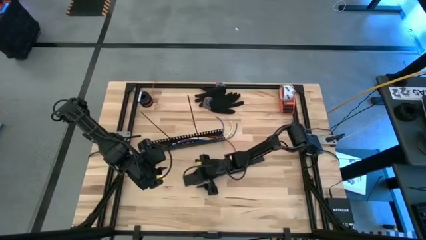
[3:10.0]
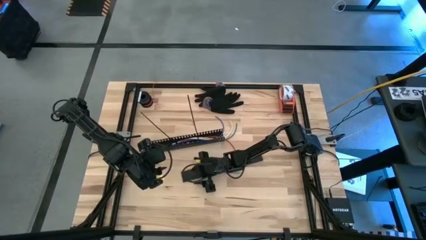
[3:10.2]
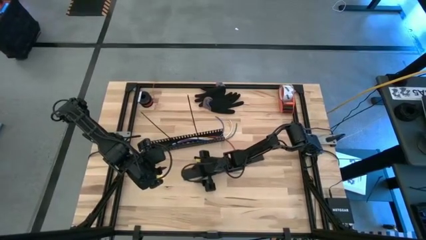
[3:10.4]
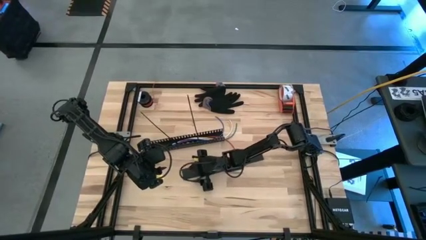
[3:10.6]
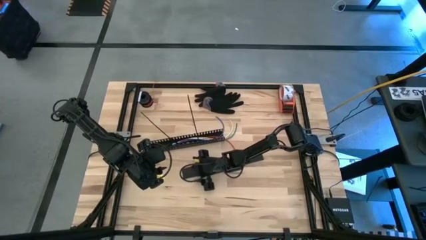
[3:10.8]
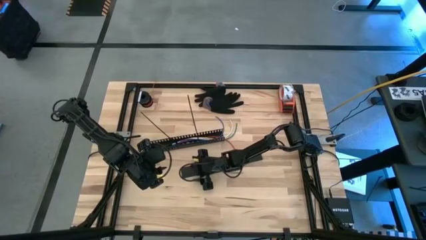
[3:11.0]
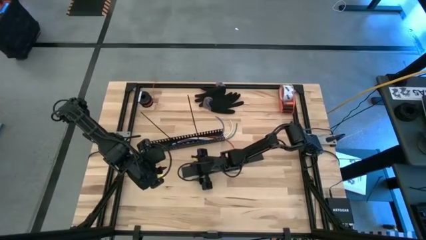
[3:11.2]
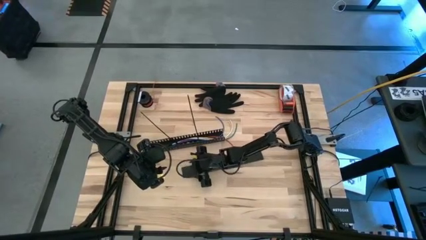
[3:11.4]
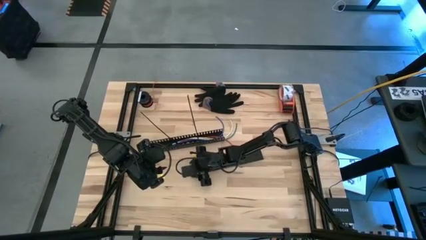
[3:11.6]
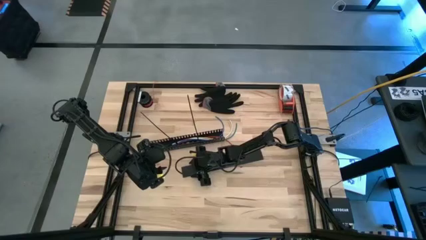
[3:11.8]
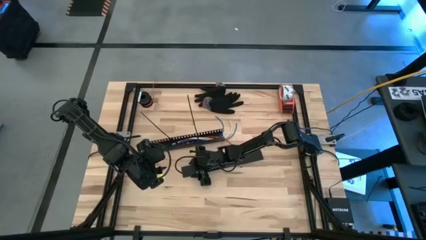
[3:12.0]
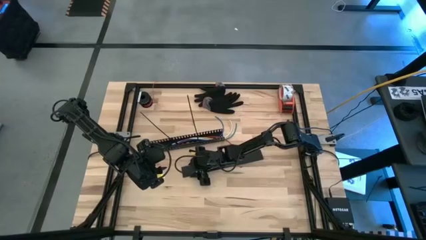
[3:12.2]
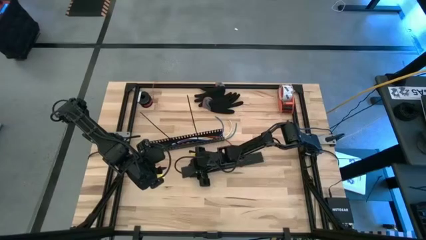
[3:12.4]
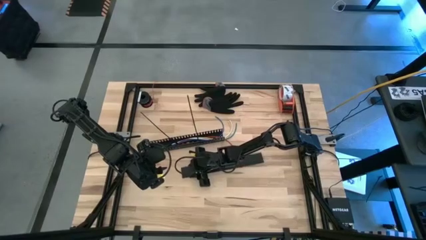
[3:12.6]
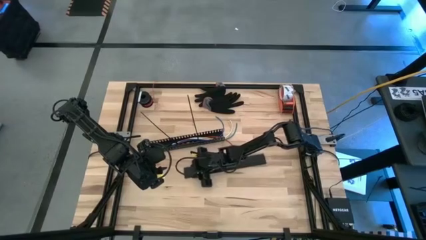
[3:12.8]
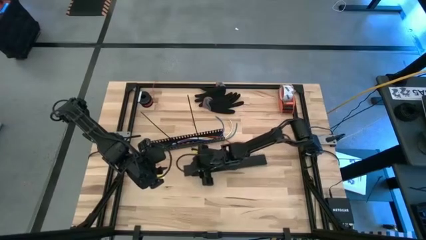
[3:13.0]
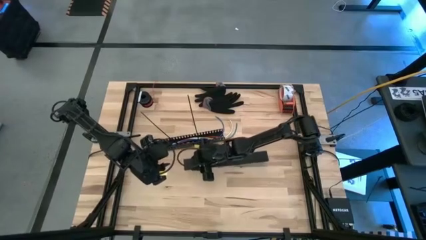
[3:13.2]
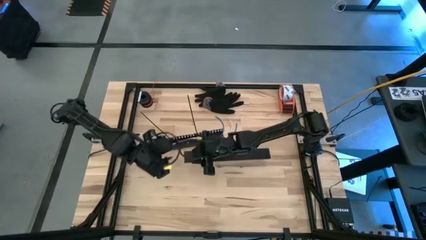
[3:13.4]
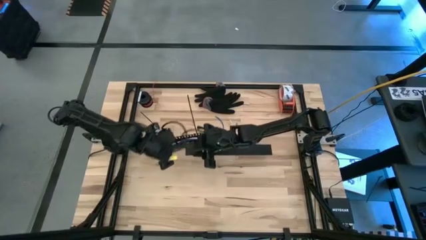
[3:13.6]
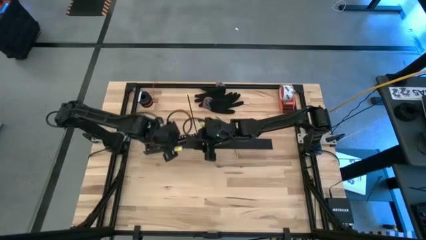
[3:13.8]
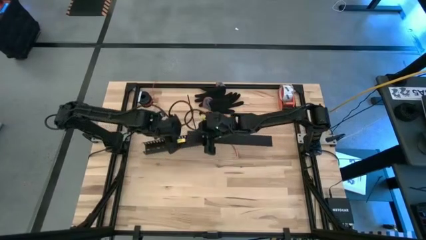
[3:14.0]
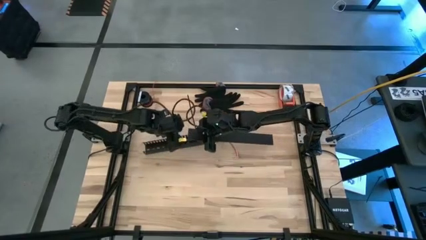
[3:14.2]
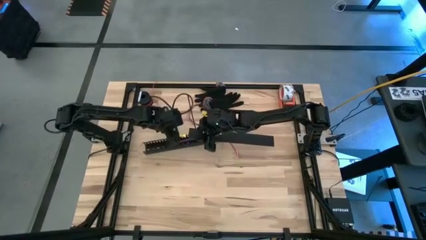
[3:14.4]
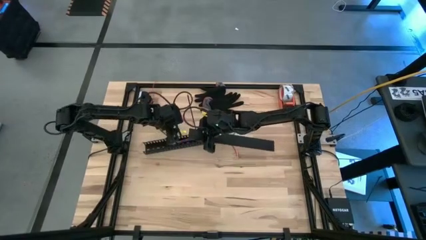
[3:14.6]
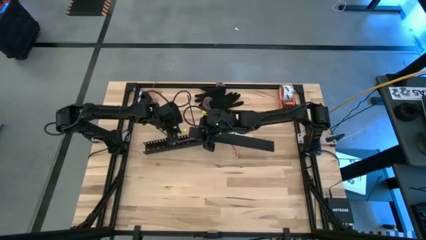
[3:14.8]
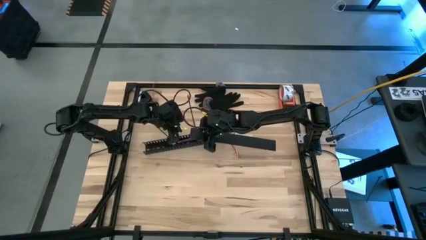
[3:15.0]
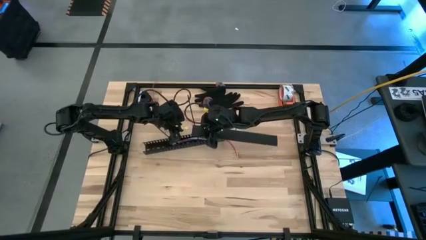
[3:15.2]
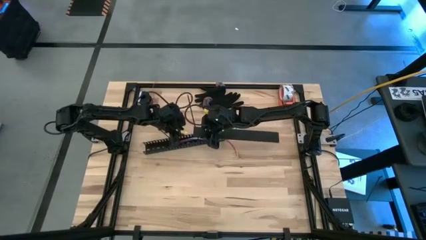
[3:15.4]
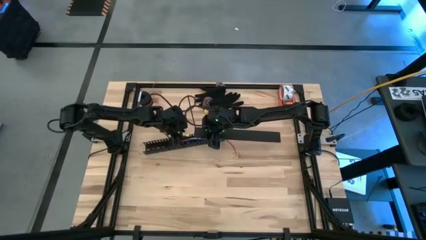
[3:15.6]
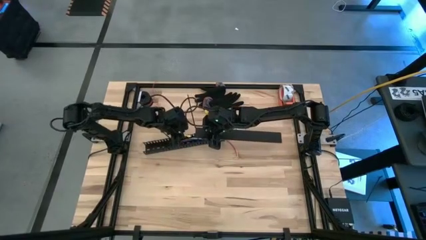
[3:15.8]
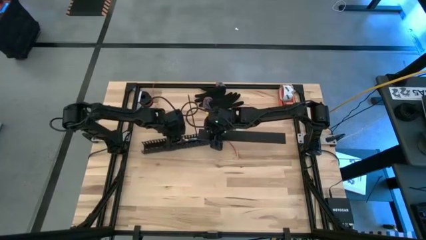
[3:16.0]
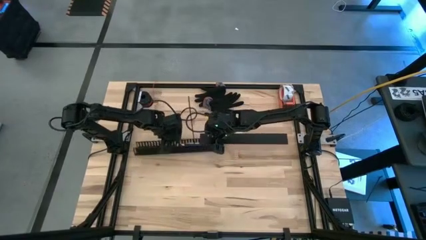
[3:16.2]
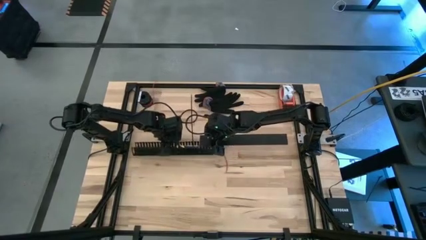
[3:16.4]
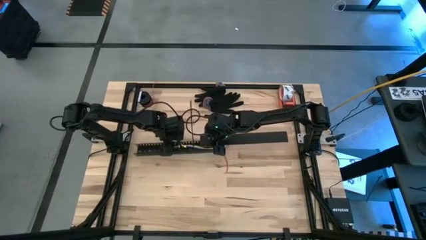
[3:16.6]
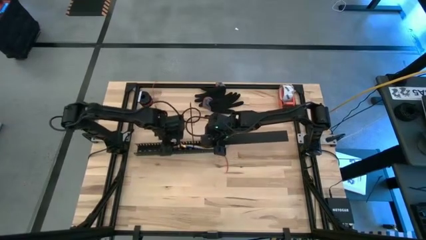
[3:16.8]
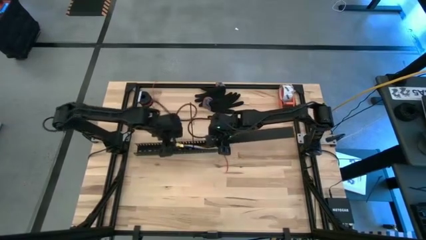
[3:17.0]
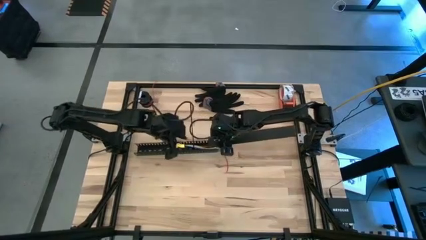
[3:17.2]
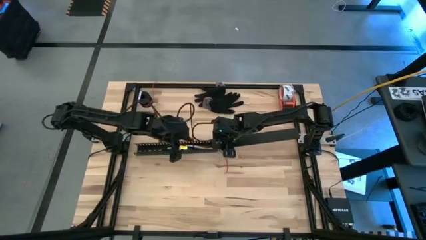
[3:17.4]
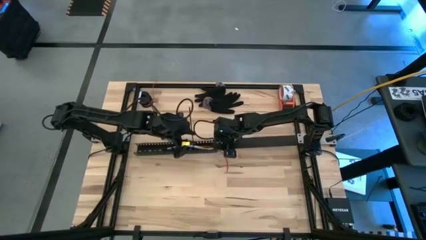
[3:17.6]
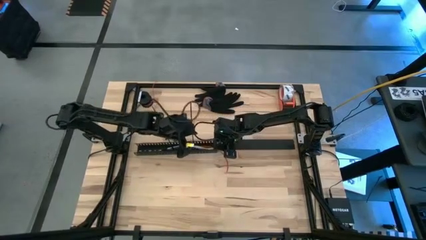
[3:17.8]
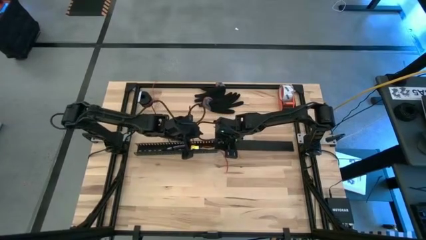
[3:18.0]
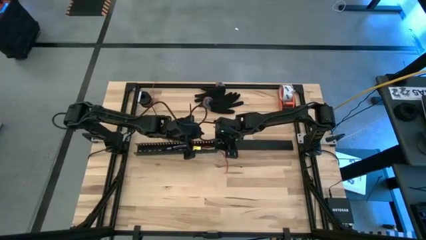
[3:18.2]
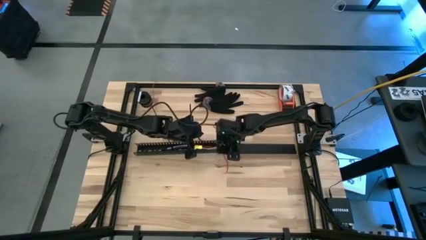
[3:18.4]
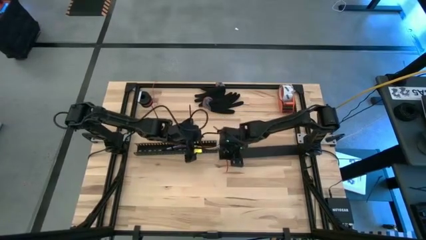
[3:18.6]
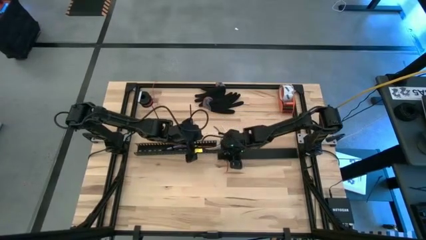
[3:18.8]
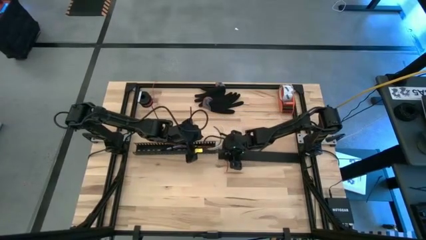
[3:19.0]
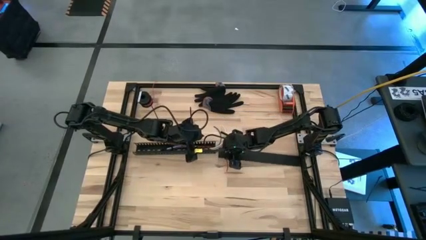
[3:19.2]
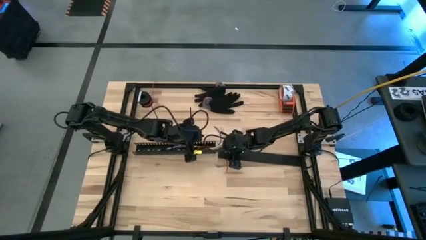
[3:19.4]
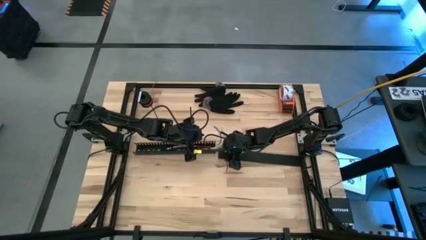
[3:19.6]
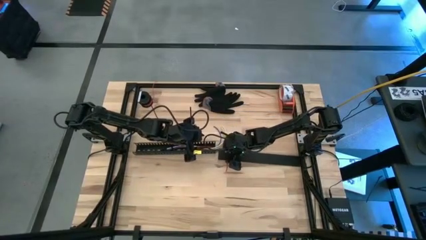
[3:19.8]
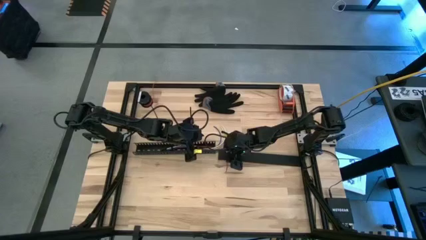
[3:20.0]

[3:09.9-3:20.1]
Task: Ziptie cables
Close the black cable duct lid

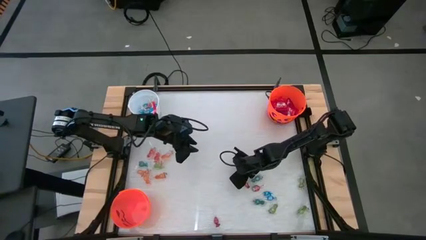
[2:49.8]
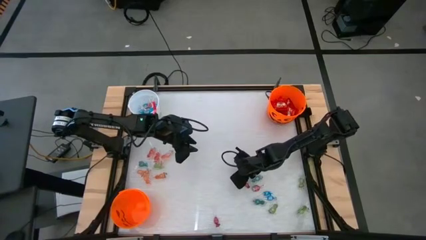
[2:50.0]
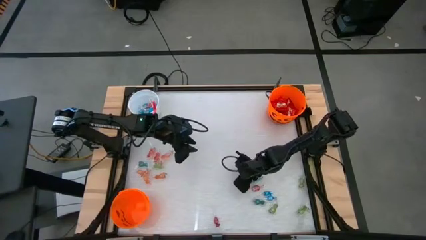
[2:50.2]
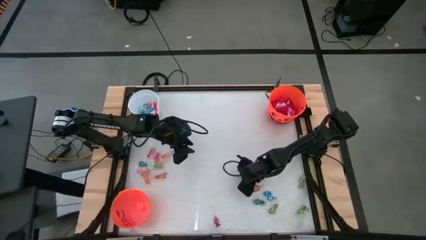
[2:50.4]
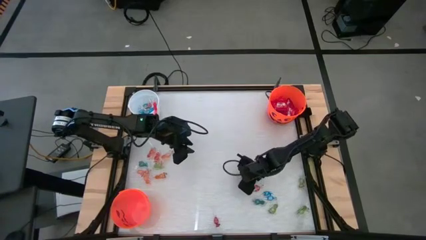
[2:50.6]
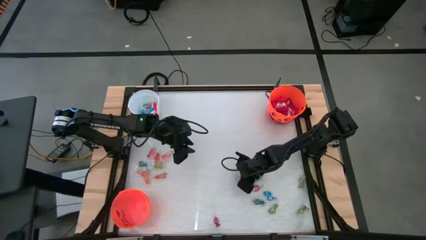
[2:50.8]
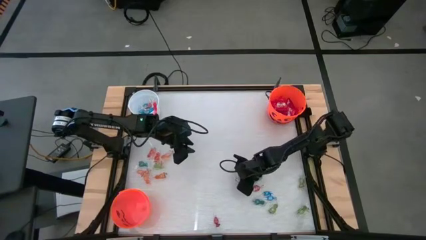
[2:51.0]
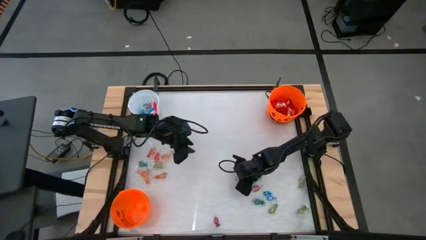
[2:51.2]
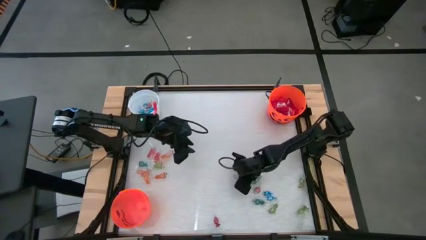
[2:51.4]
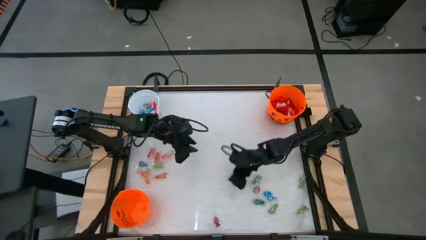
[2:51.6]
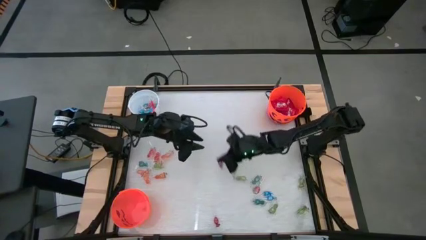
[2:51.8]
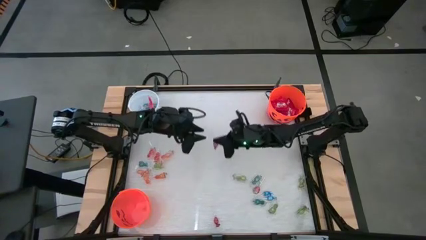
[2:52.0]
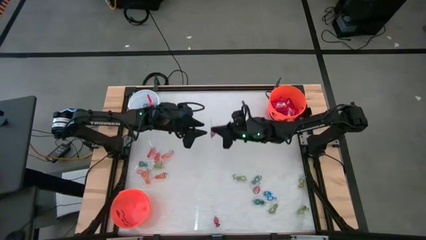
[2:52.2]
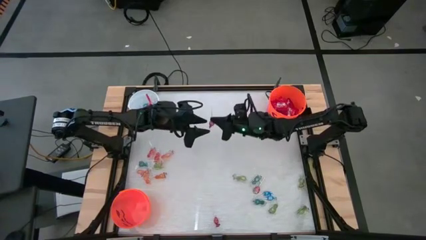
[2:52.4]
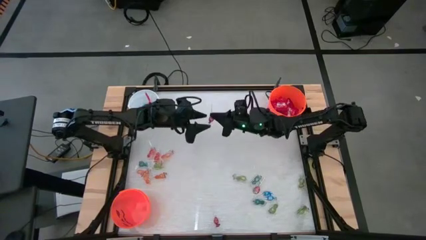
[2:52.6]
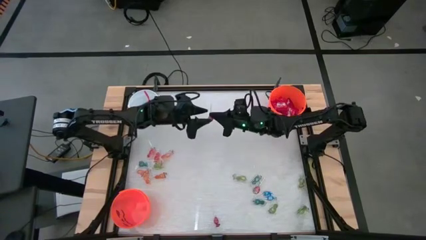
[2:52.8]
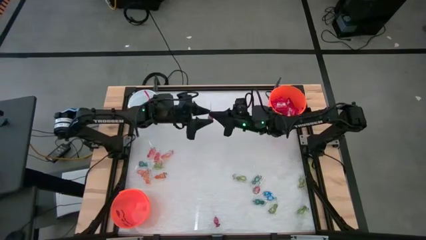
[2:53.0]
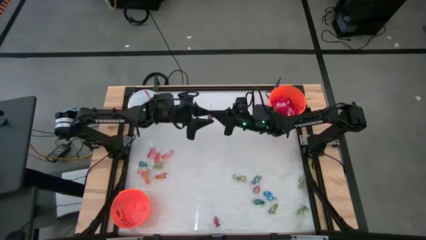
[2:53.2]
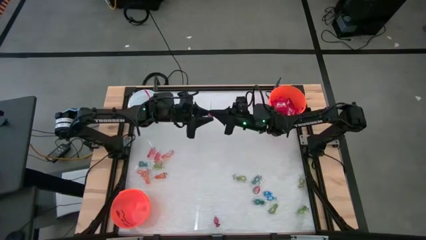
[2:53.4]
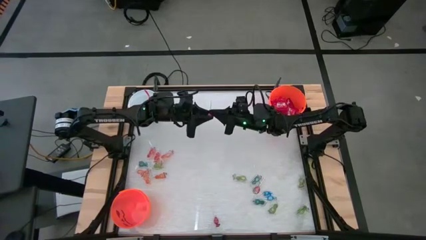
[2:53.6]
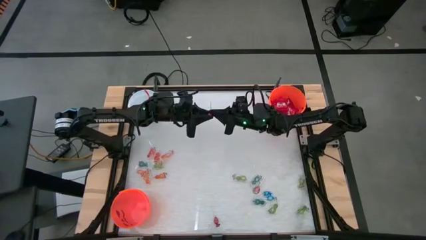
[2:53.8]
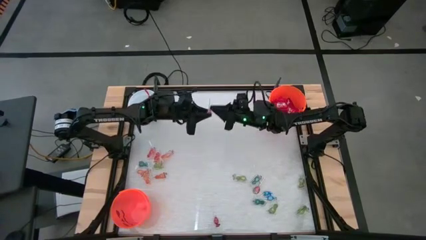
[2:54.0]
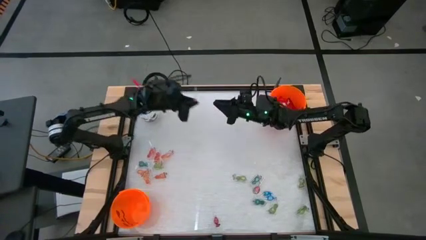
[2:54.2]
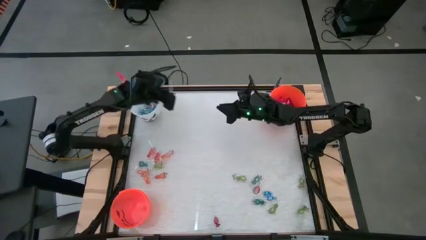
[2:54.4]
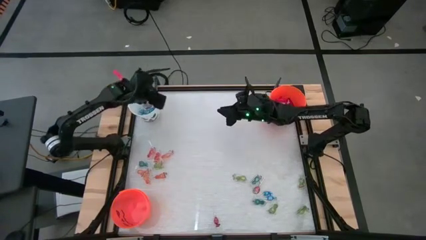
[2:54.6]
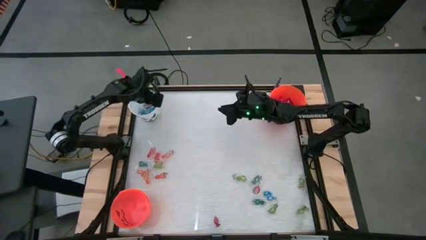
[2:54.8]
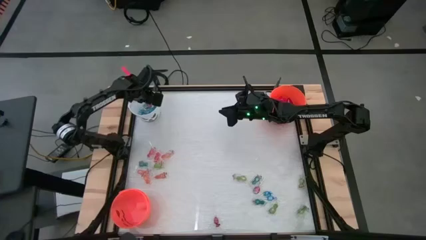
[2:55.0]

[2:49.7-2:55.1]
Task: Sort candy by brand, put in halloween buckets
Put the red lollipop into the white bucket
